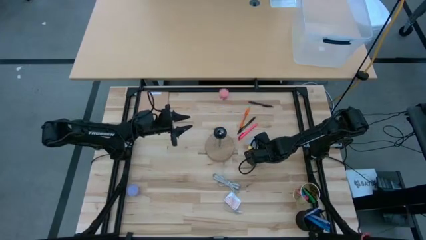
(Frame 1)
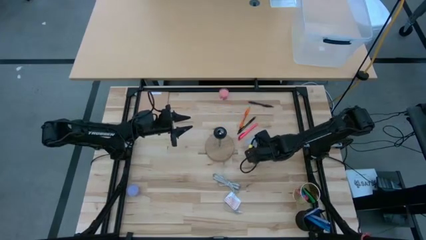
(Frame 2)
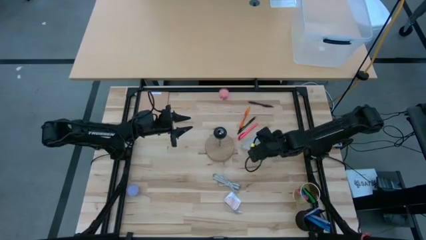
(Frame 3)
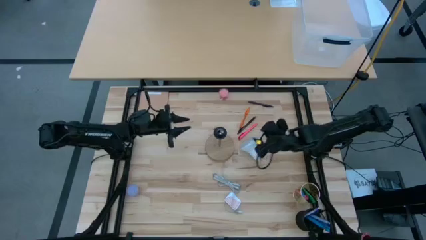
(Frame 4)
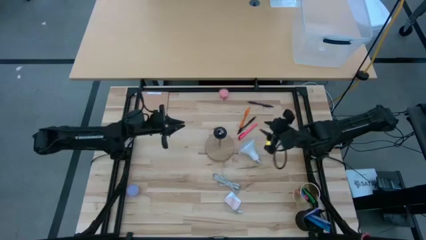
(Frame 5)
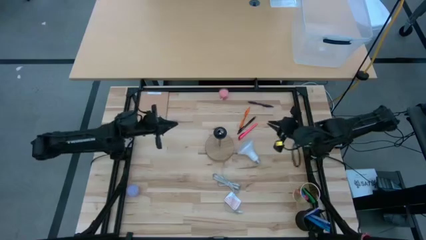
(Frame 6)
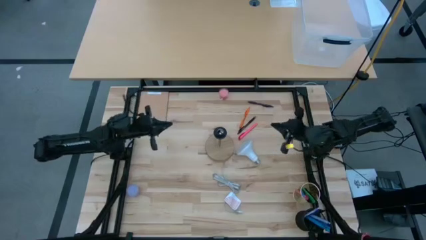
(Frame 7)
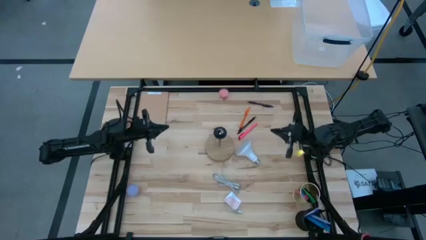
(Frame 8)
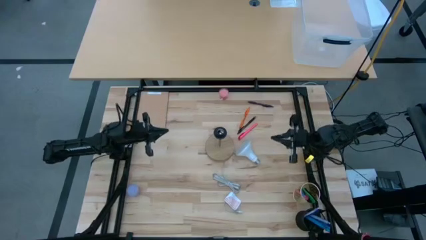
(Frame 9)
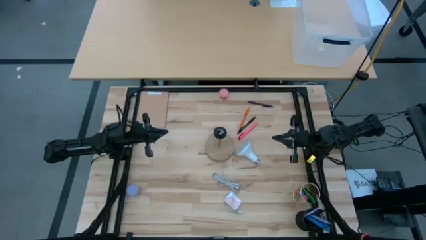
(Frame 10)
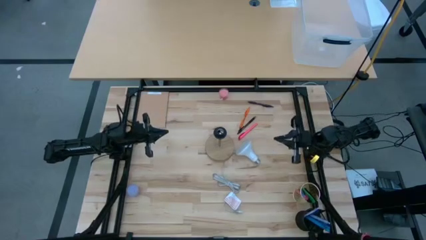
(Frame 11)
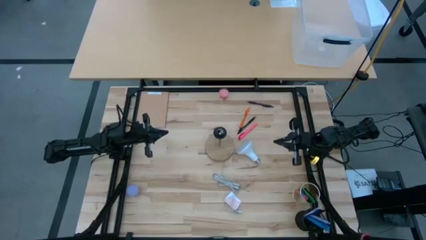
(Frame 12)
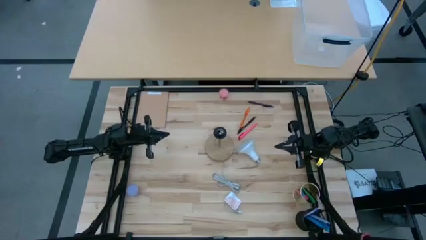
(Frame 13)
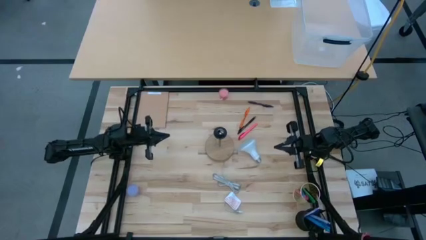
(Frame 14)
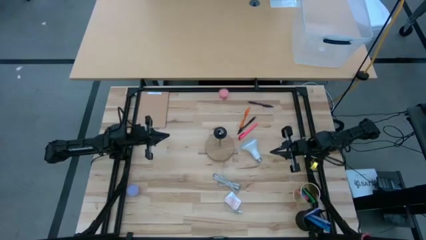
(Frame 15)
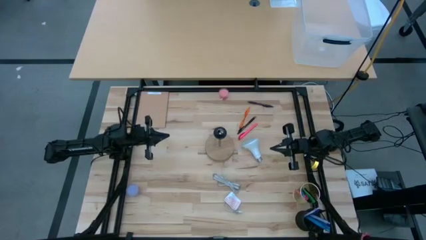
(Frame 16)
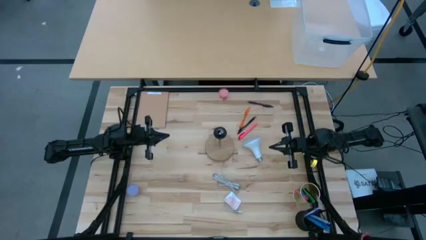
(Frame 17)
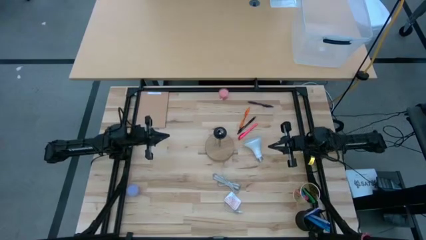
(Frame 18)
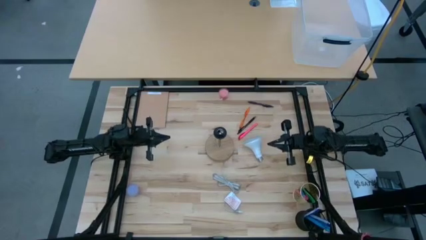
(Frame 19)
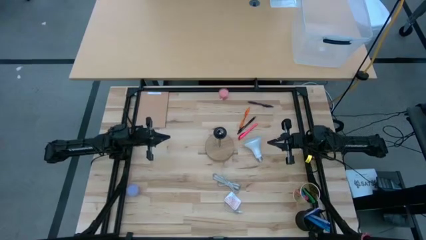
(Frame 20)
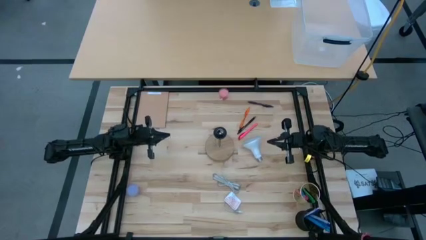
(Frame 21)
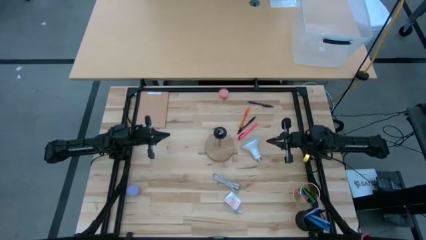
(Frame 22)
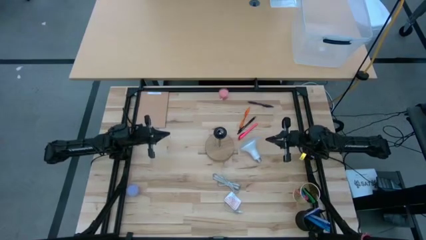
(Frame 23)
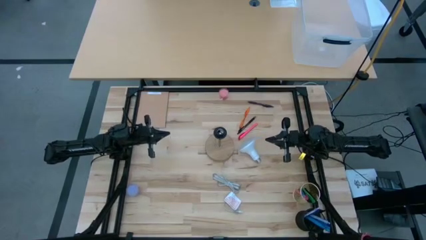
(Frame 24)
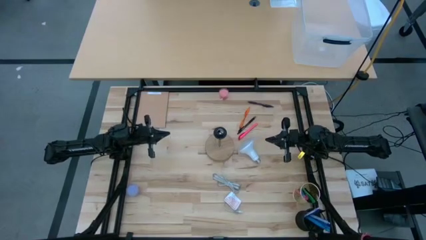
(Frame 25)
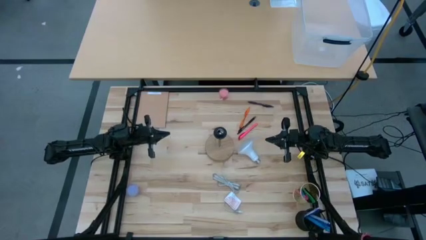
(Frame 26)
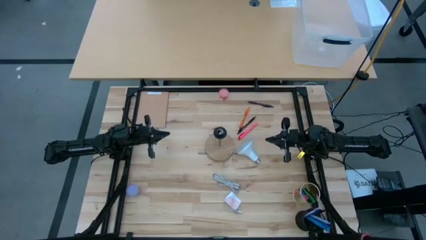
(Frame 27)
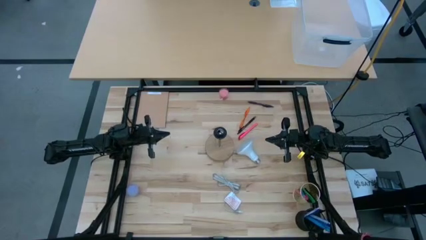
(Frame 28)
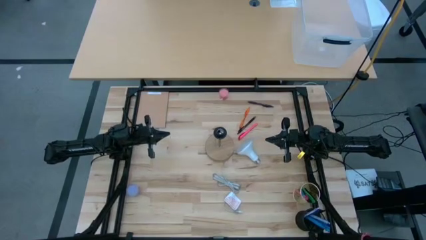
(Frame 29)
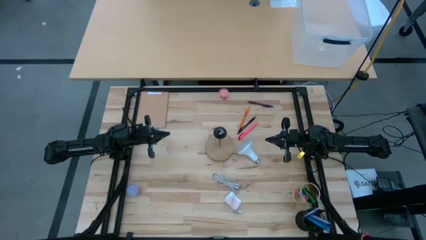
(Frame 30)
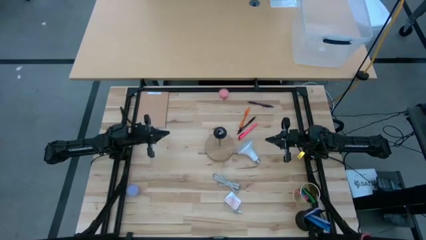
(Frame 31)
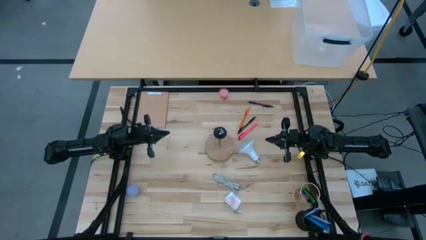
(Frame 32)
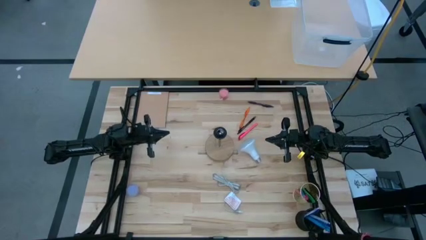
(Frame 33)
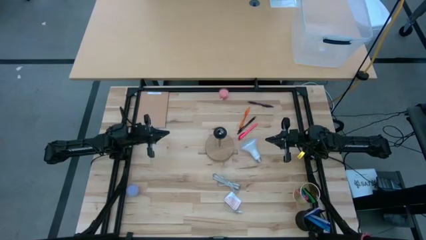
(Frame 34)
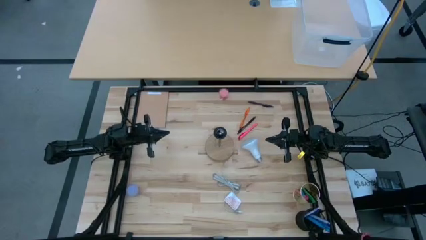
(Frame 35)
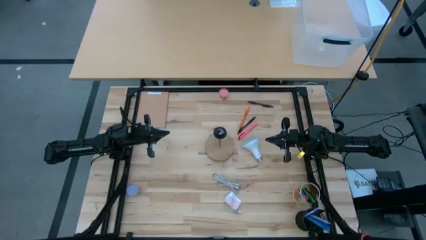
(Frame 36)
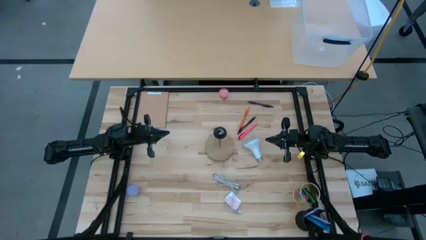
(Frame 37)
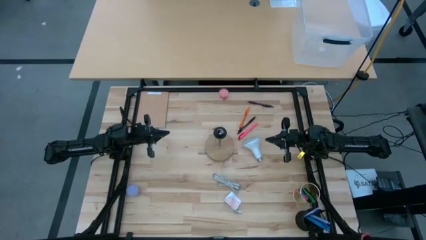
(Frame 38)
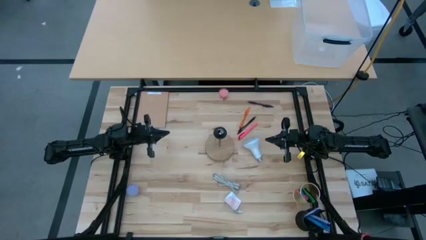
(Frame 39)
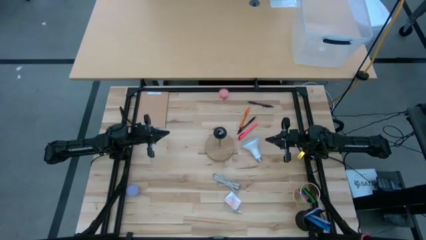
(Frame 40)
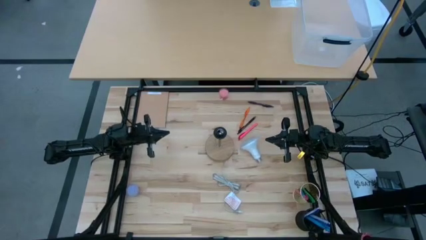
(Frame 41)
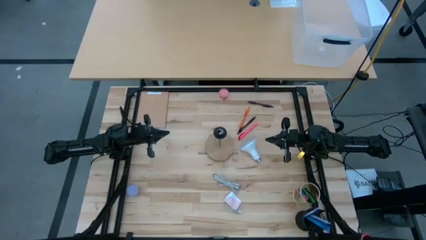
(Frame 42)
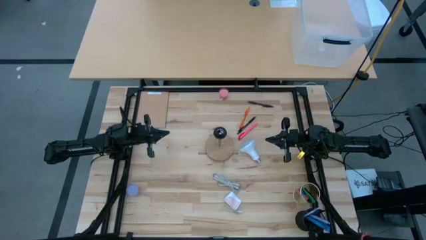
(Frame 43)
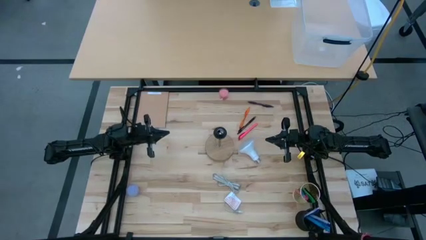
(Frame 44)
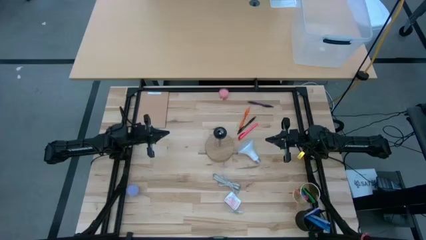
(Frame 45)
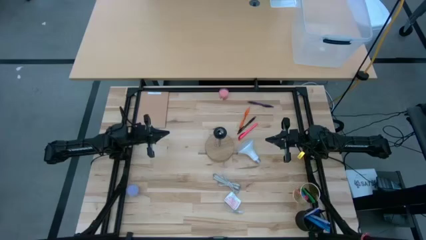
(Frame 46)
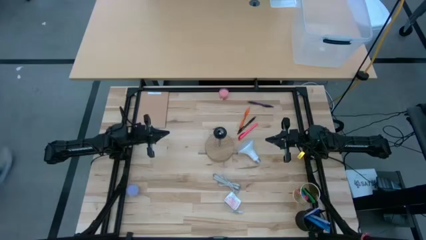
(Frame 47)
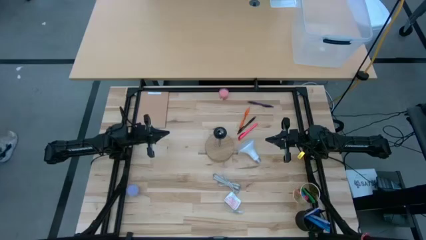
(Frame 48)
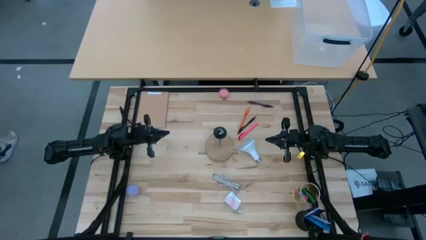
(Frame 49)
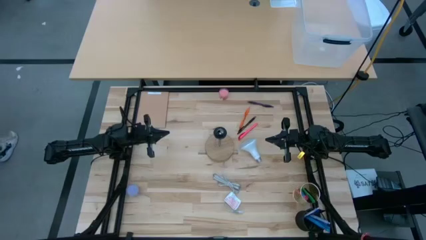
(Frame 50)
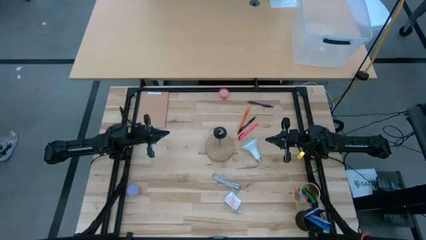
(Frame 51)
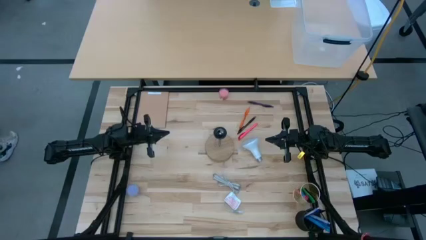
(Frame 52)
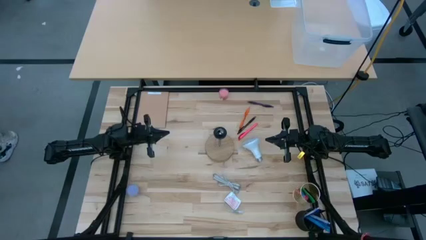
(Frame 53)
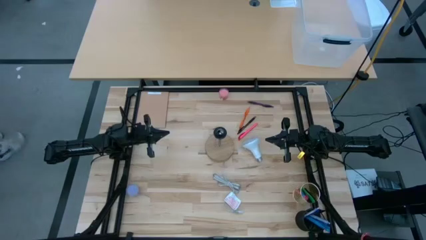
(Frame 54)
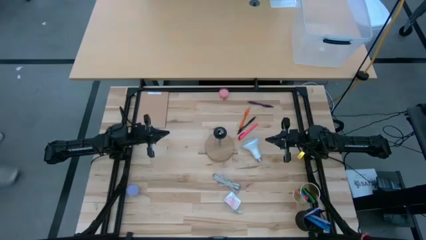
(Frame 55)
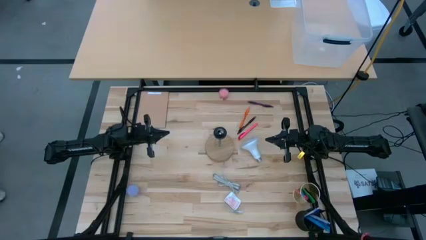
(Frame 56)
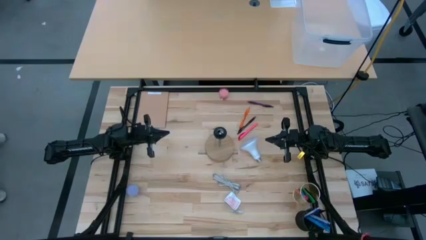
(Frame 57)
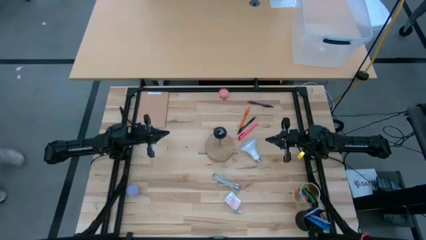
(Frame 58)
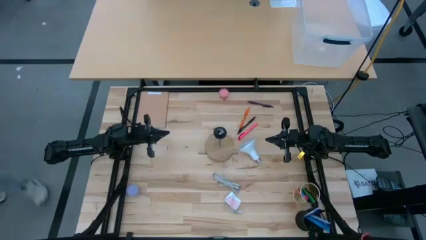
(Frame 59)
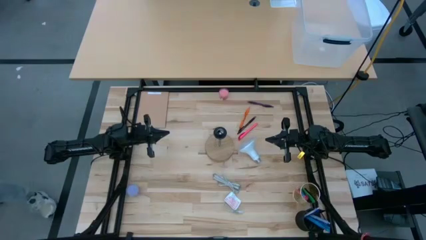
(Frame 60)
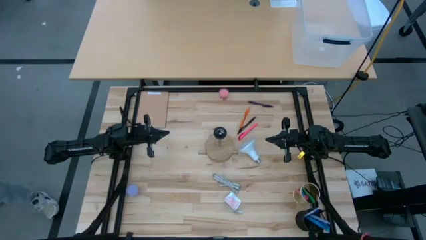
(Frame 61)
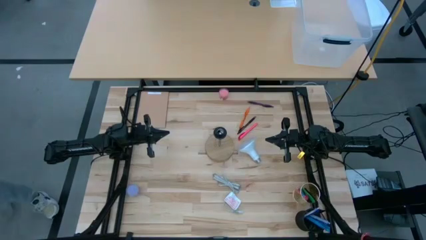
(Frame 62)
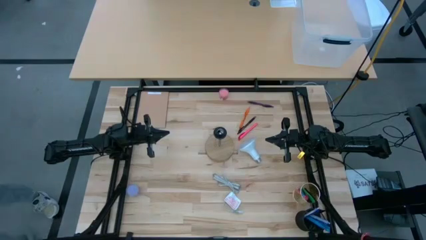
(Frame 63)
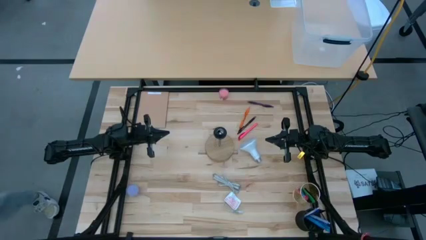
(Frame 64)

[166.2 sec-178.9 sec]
Task: Screw lightbulb
Return to Home Position

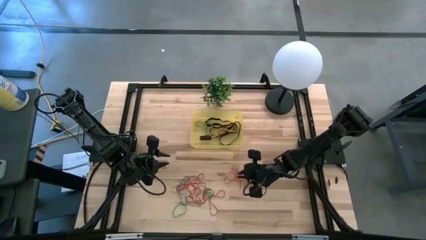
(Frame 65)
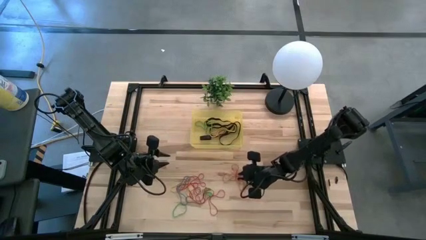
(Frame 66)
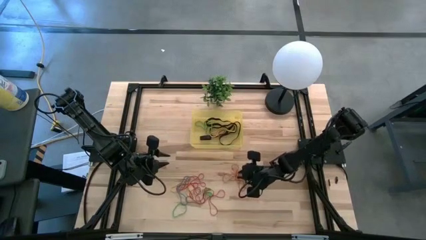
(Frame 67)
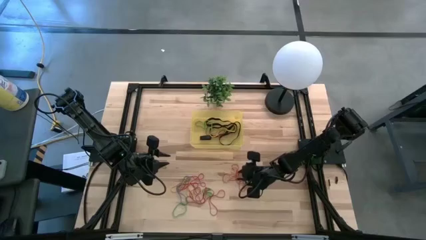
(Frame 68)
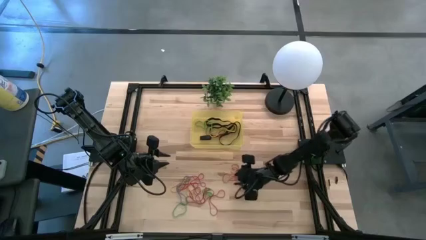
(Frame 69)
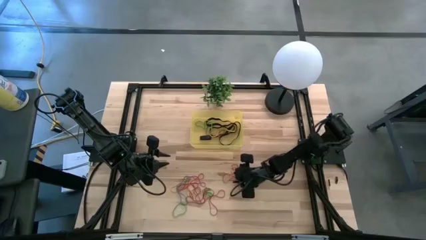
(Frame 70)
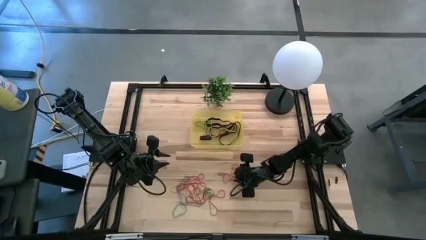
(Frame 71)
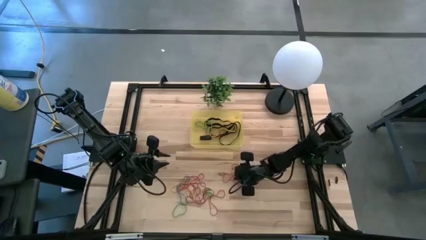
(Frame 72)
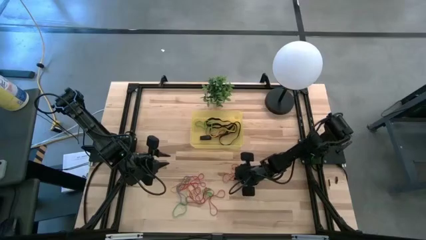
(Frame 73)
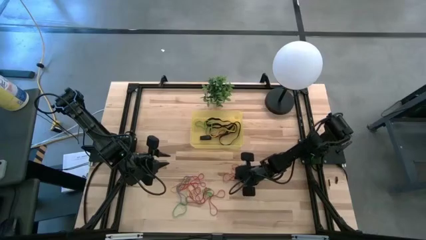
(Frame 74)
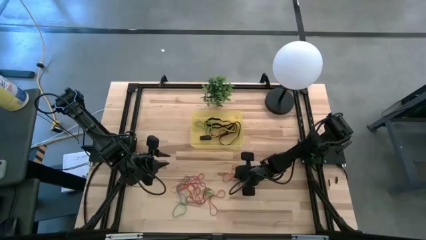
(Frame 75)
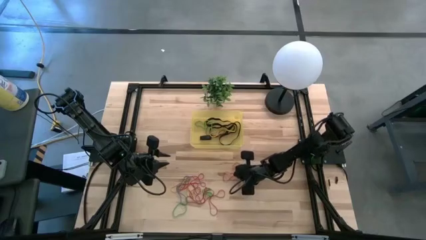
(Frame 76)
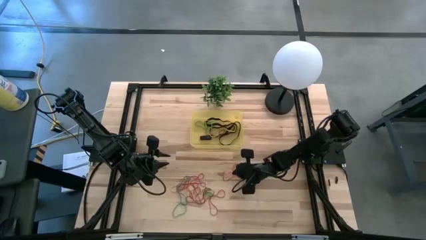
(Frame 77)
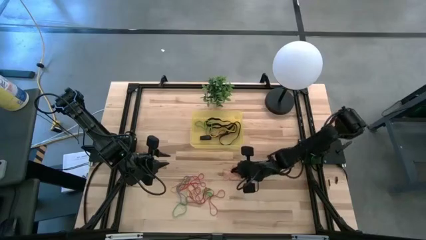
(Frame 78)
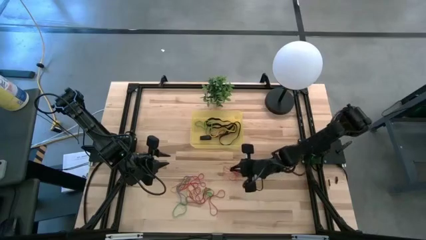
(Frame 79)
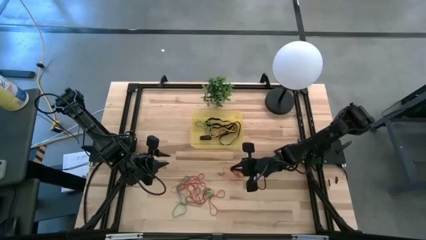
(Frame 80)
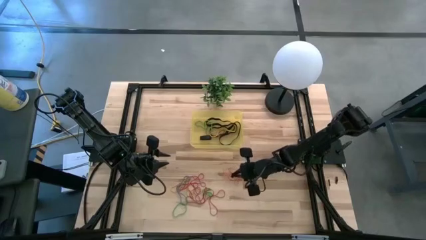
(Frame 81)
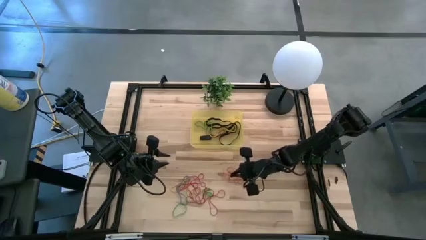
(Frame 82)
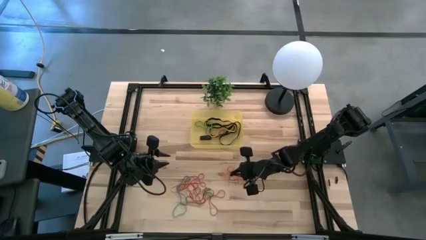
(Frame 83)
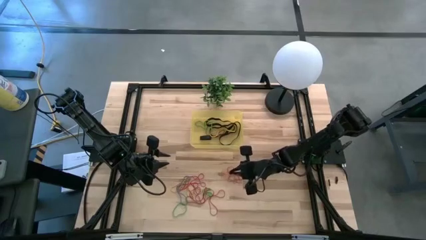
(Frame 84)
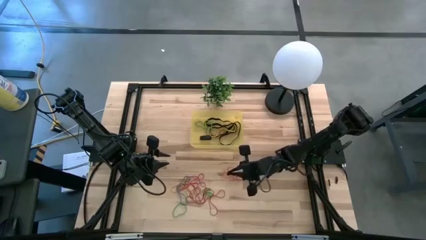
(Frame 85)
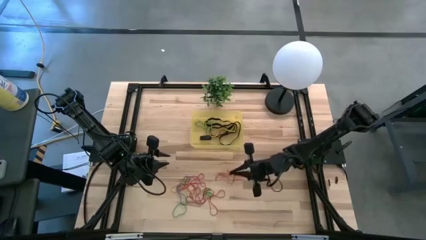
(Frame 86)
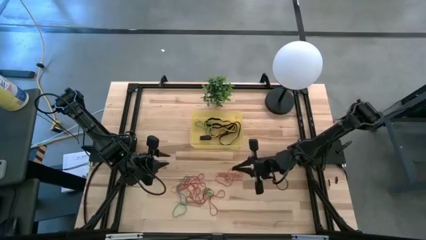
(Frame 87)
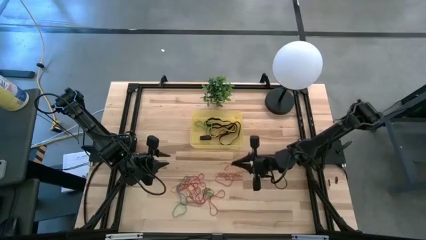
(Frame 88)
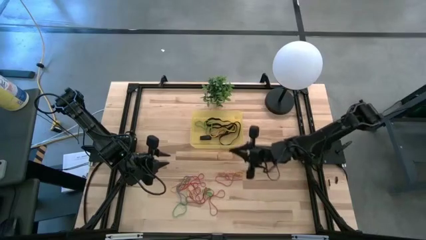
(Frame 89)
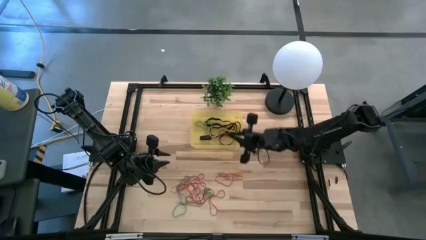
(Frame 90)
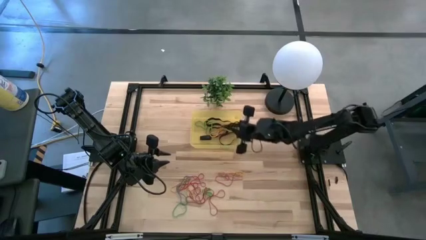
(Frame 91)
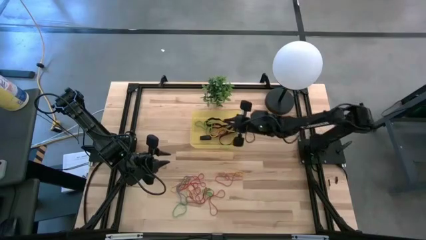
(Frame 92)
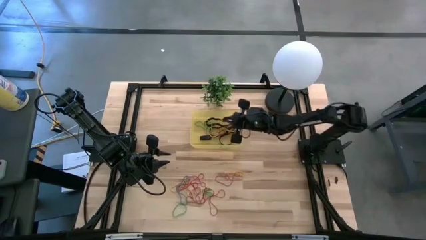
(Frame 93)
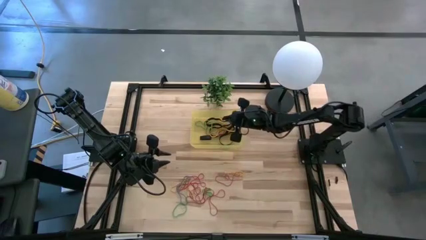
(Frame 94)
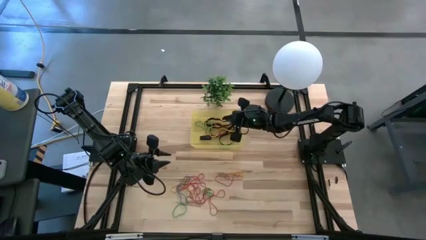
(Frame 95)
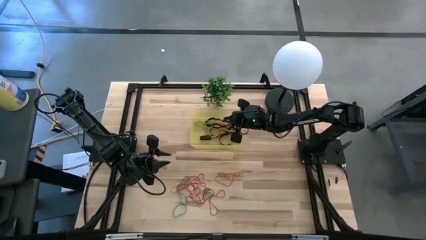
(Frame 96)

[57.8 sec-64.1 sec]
Task: Pick and place rubber bands into bin
Put the red rubber band into the yellow bin
